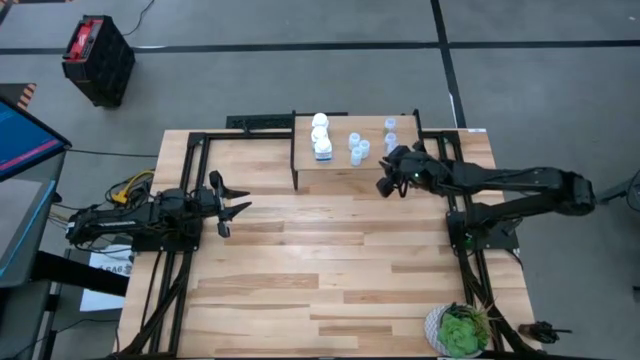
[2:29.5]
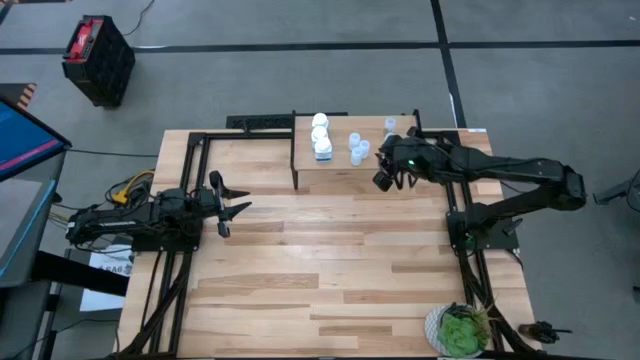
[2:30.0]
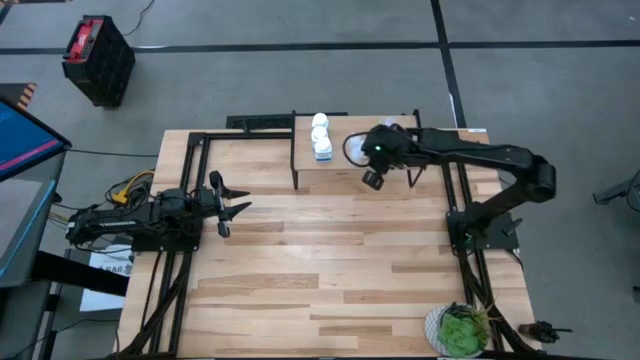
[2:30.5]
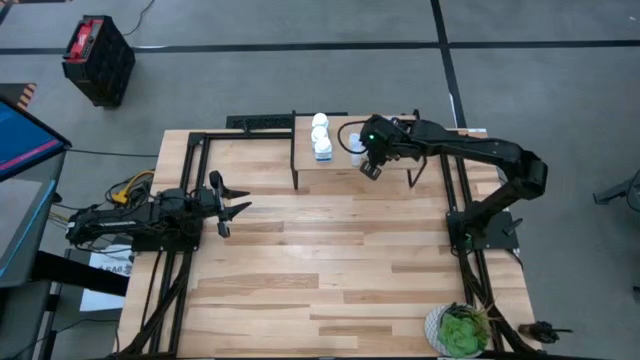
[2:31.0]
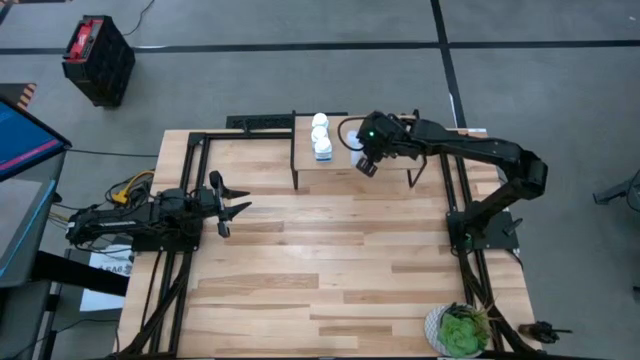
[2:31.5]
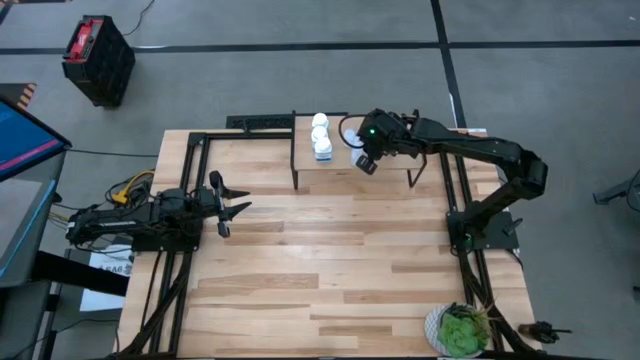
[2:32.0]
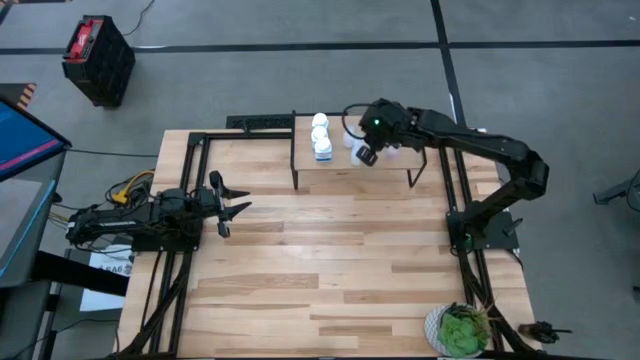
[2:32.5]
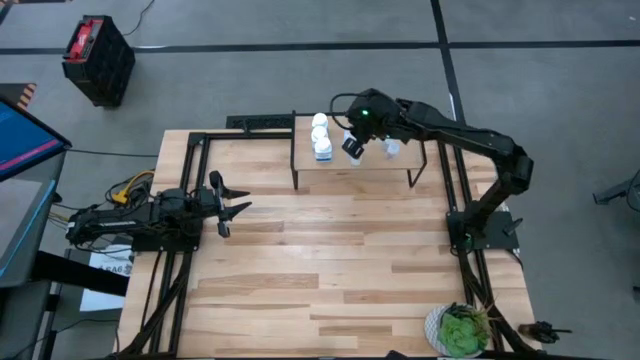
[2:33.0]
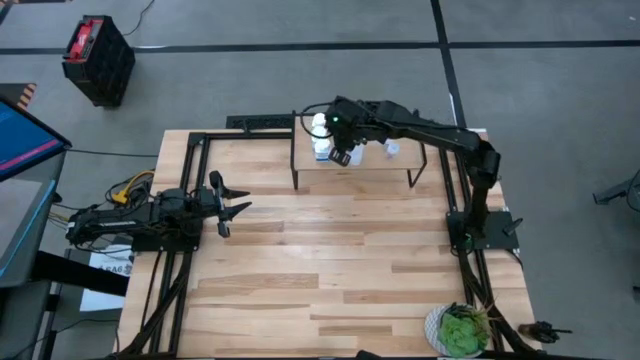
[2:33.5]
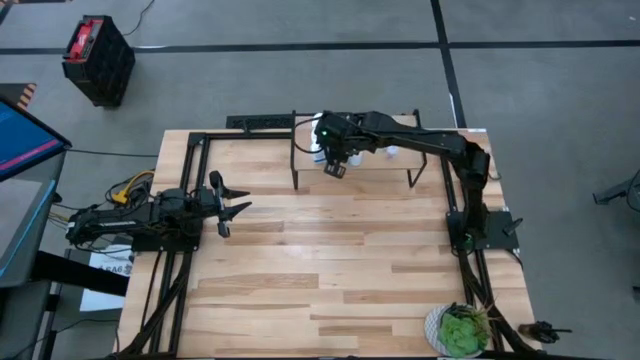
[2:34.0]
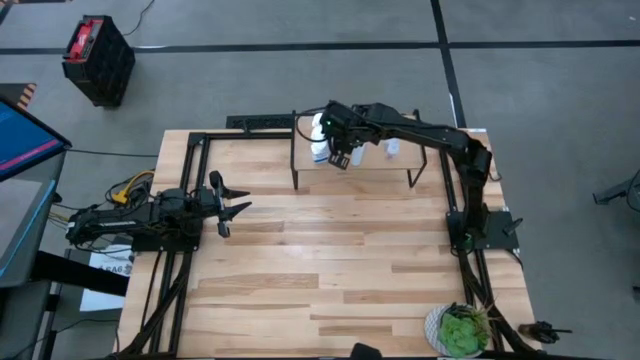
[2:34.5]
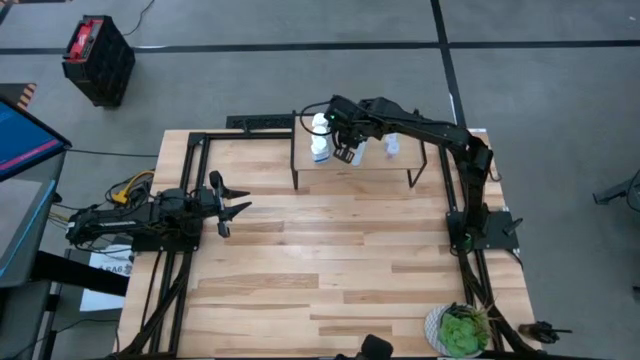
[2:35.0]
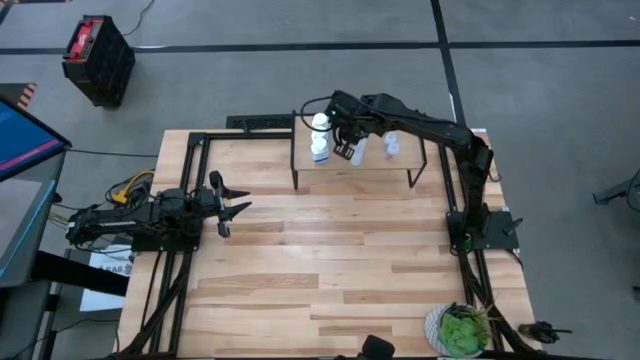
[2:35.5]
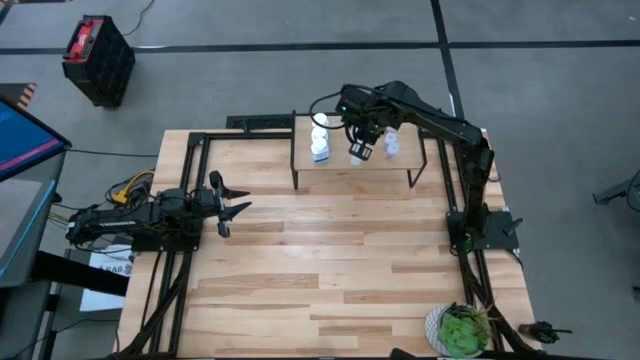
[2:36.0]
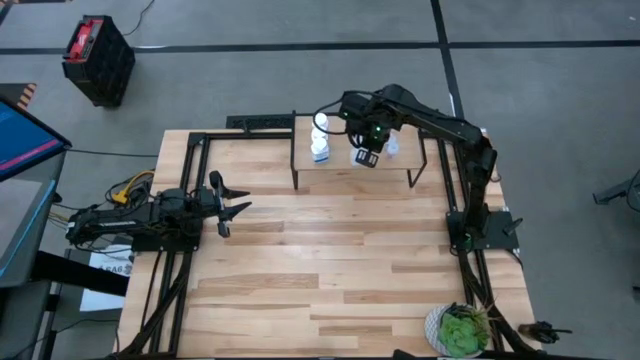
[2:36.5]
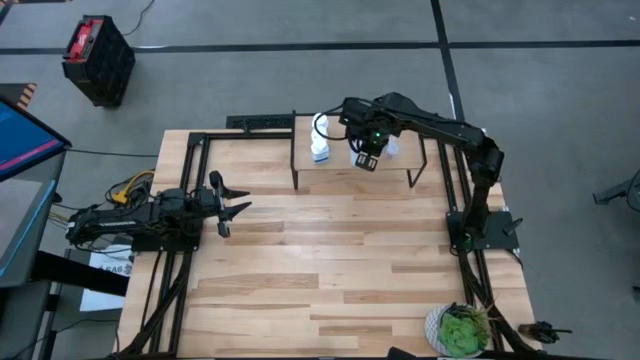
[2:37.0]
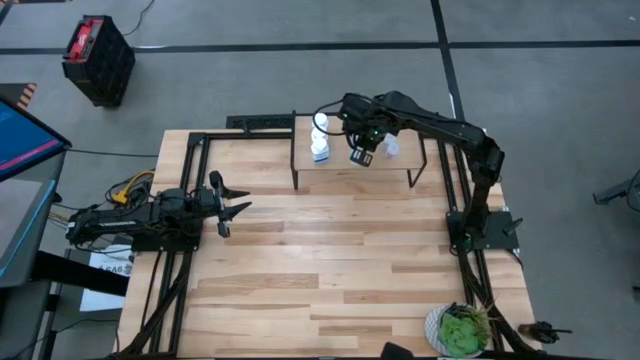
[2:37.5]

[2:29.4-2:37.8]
Task: Pick and place medicine bottles onto shelf by color
Adjust the translucent medicine bottles on the shelf

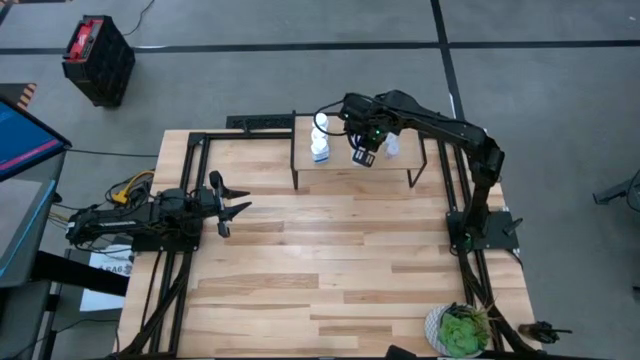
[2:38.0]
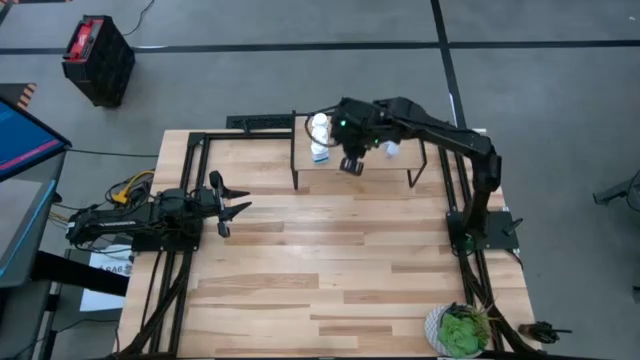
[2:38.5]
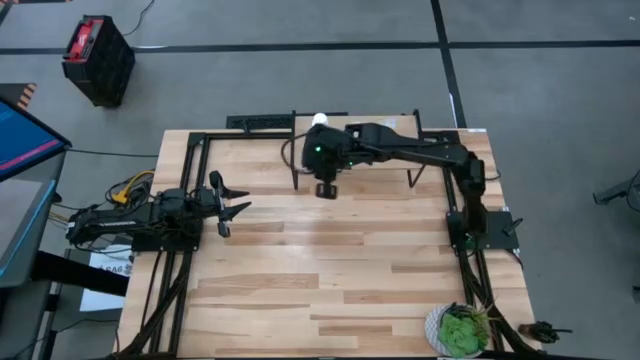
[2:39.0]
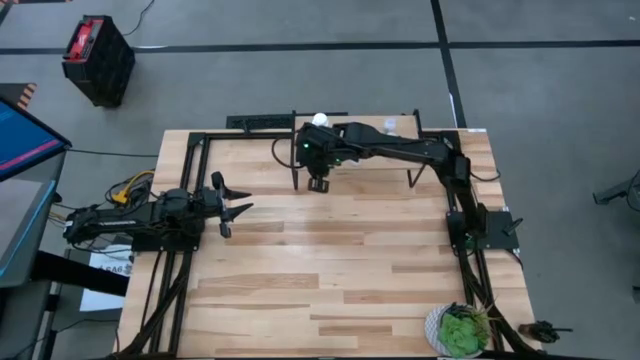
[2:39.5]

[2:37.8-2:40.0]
Adjust the opaque medicine bottles on the shelf

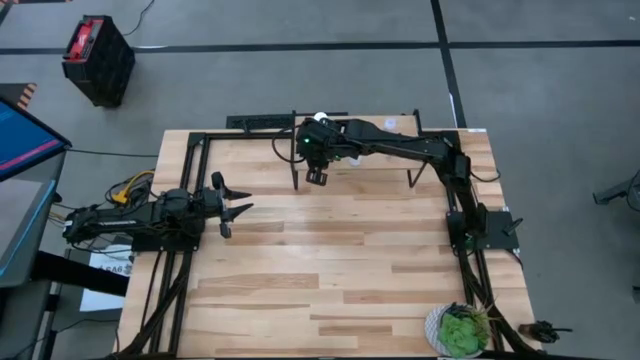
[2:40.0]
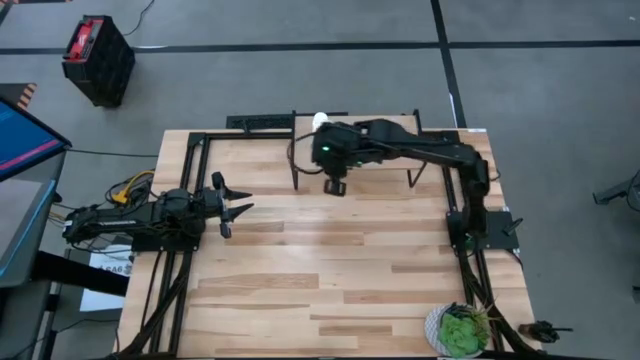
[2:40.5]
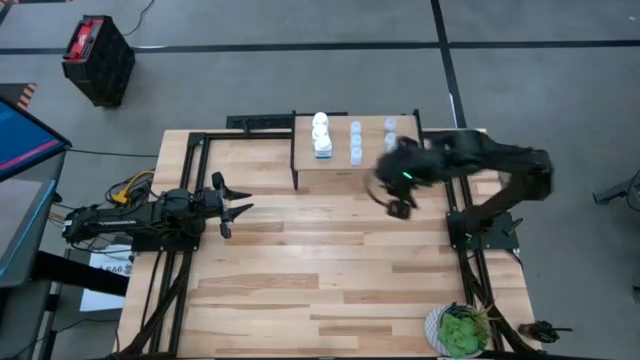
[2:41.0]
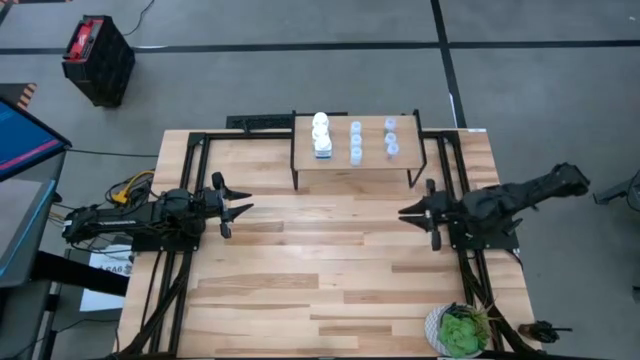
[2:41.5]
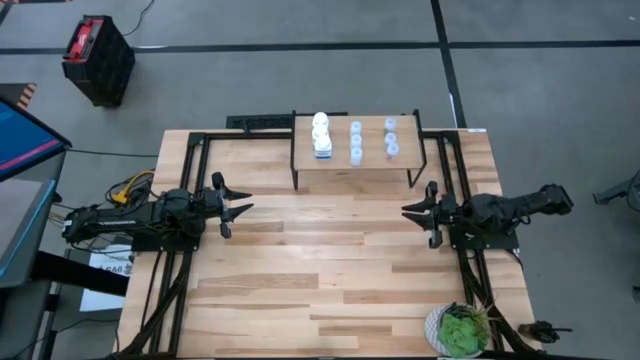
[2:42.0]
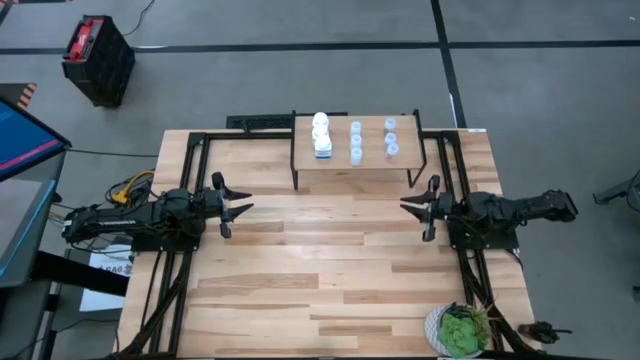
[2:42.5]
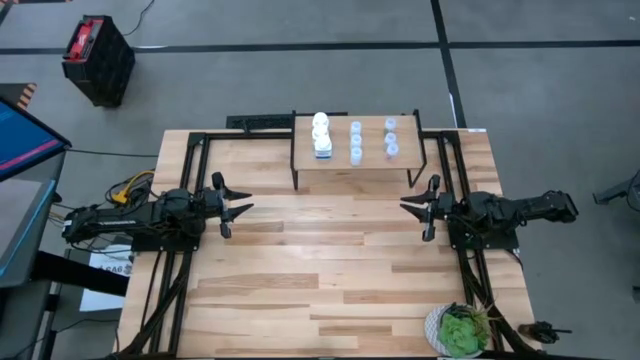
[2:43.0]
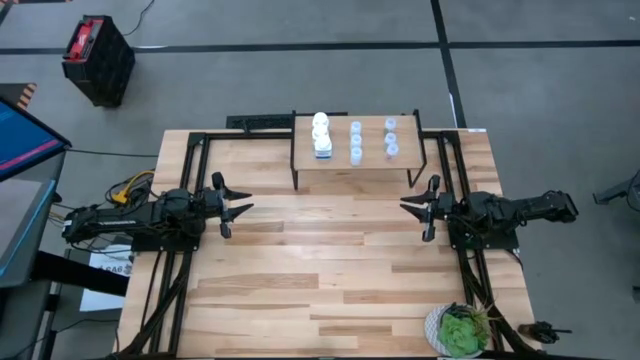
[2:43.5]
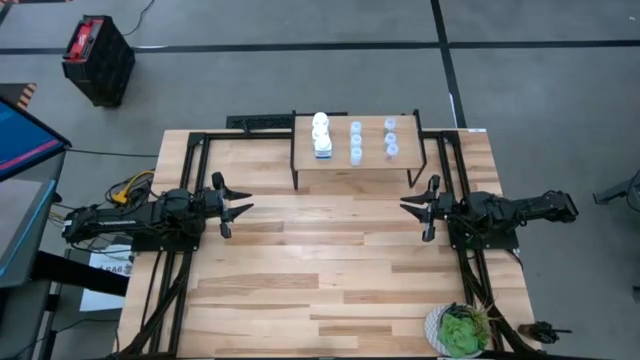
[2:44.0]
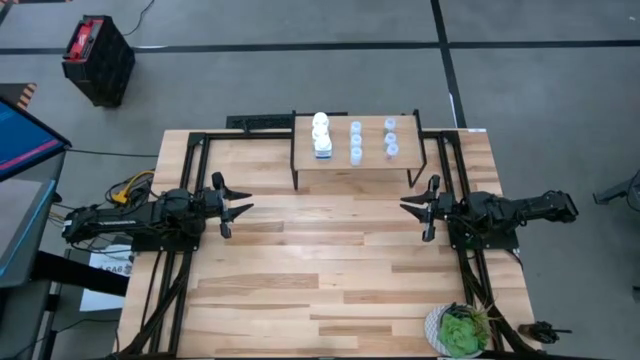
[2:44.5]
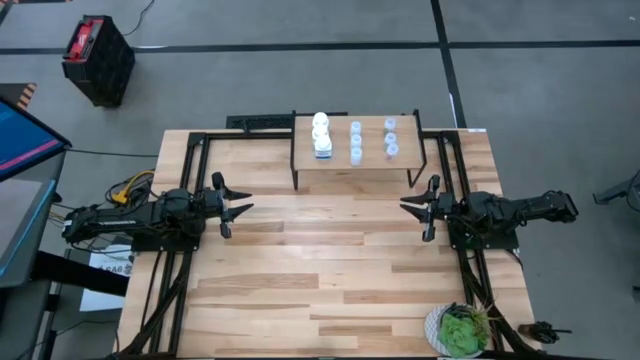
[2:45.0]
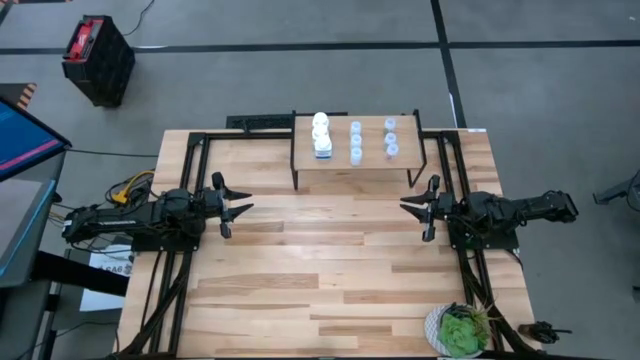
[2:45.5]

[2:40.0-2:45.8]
Return to Home Position

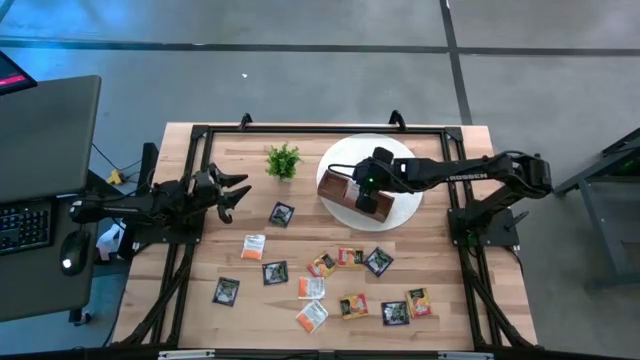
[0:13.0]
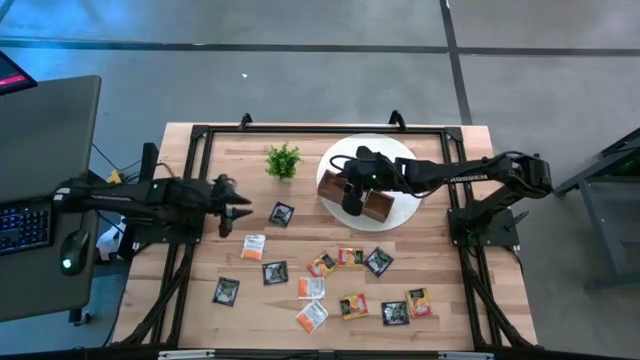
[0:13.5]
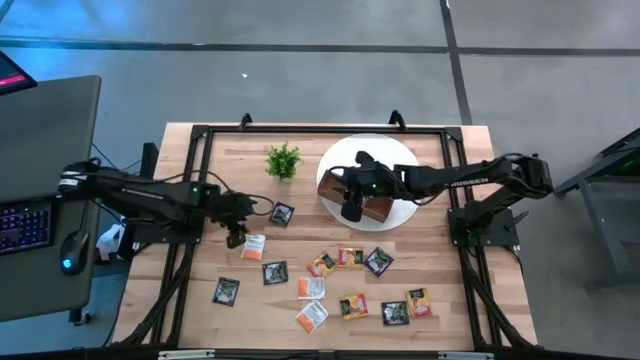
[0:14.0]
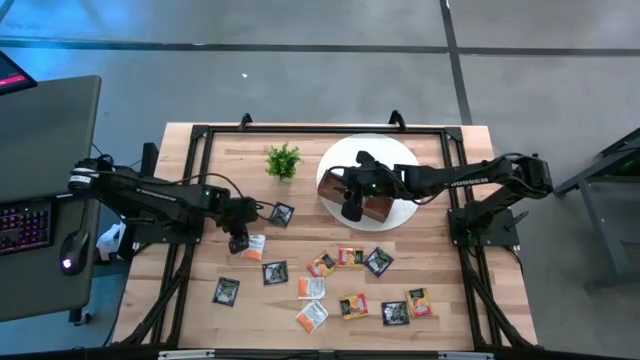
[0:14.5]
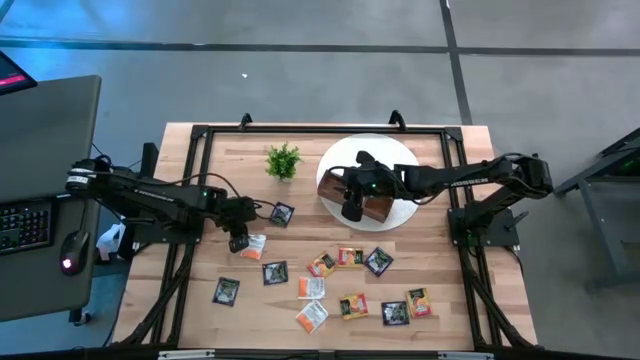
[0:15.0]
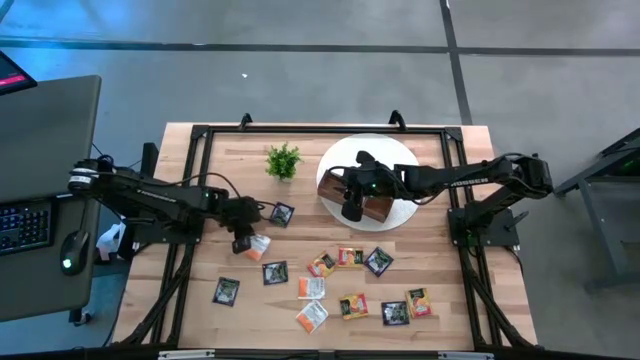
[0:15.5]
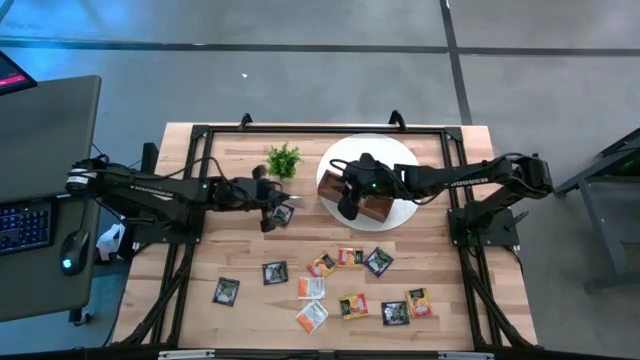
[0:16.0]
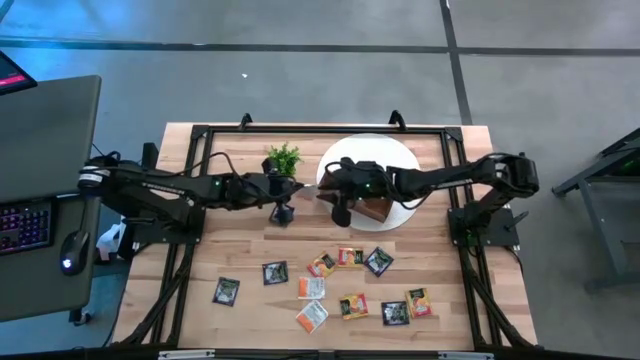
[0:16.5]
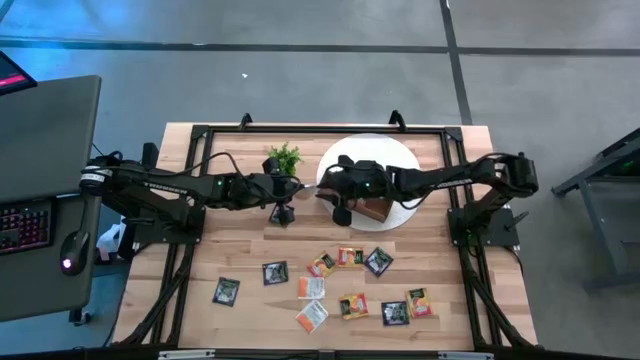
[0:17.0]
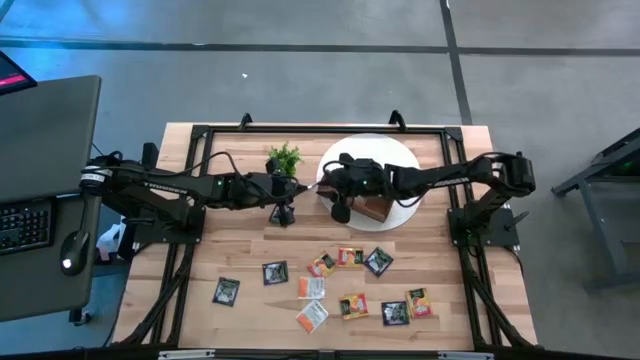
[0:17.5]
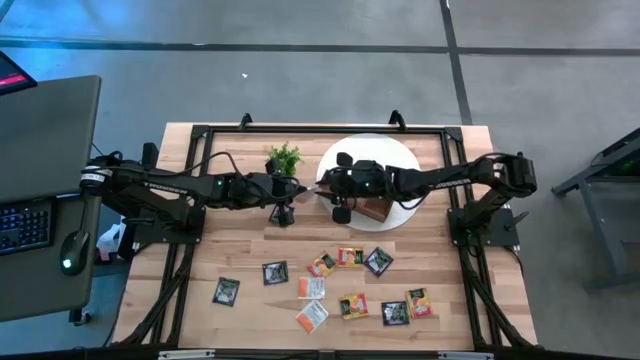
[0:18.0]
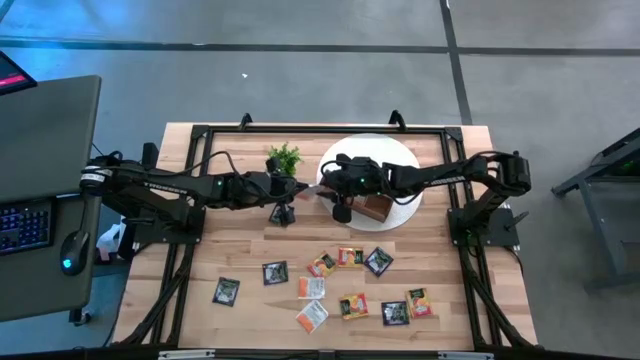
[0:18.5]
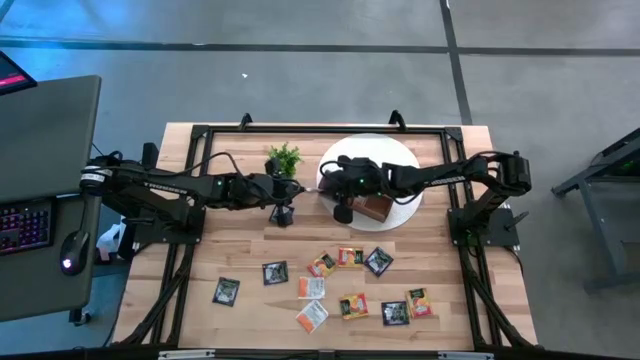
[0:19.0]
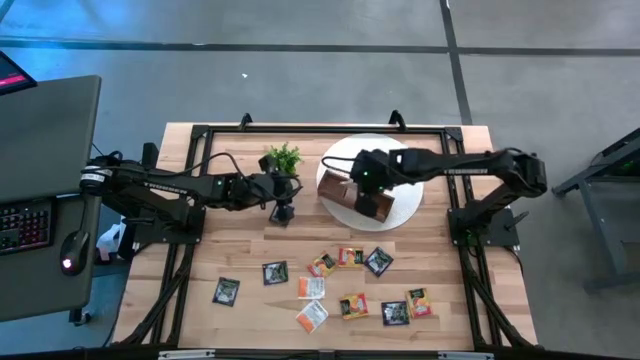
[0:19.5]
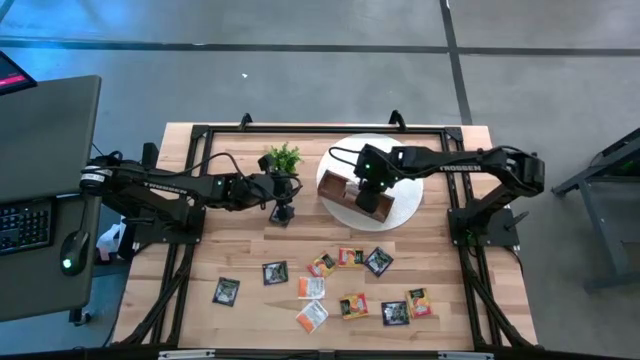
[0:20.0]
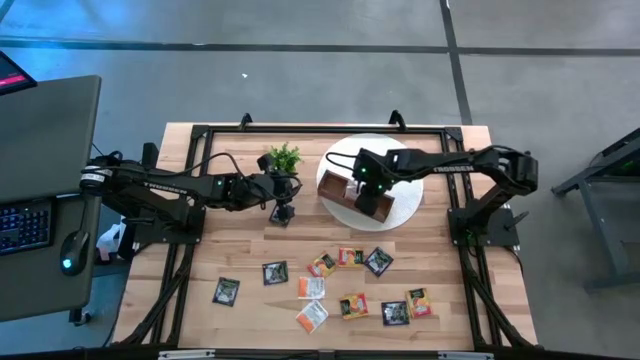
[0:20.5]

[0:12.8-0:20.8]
Task: Pick & Place Tea
Put the white tea bag into the middle compartment of the wooden organizer
